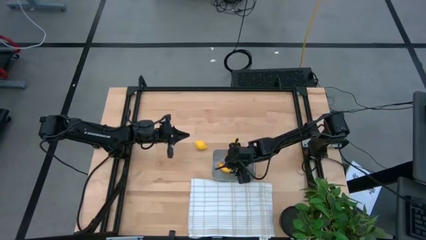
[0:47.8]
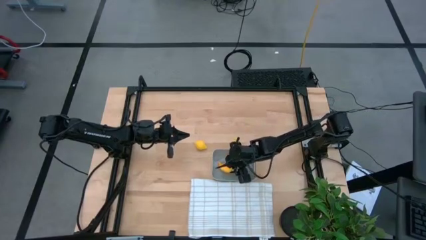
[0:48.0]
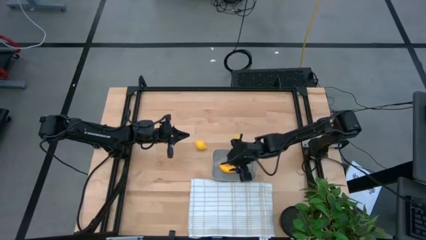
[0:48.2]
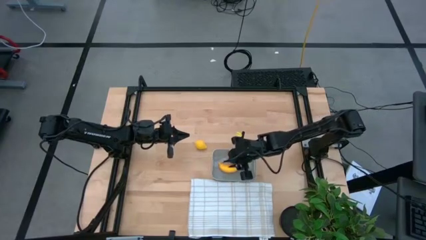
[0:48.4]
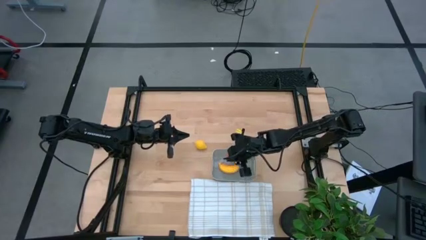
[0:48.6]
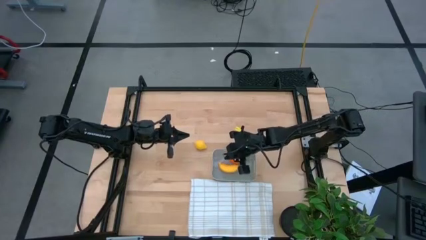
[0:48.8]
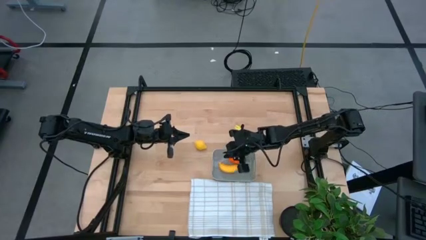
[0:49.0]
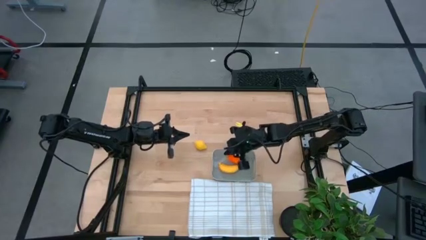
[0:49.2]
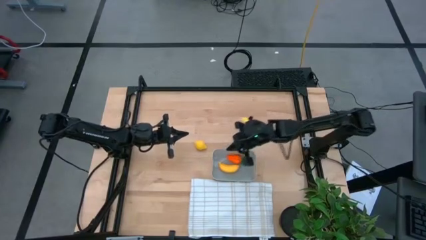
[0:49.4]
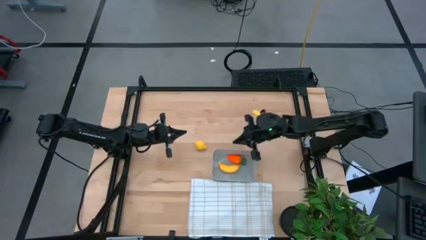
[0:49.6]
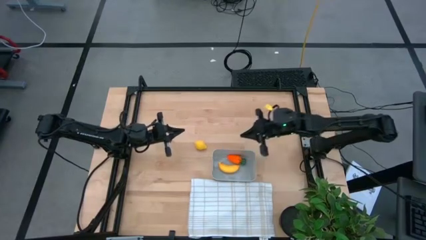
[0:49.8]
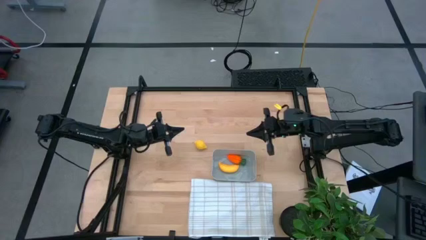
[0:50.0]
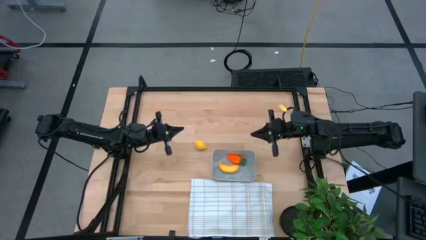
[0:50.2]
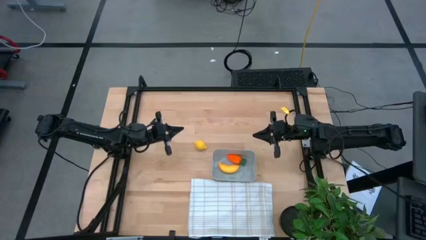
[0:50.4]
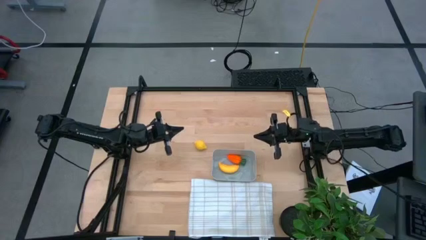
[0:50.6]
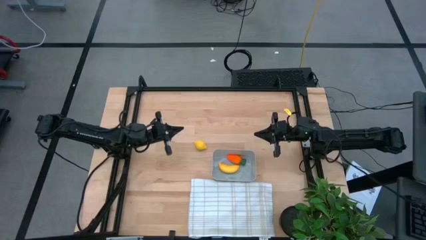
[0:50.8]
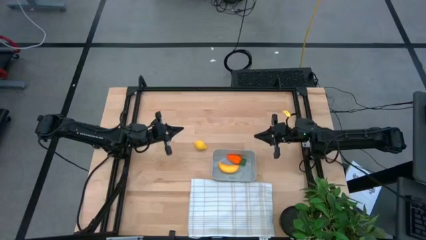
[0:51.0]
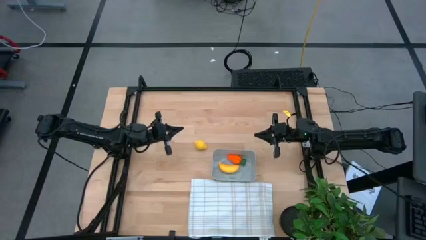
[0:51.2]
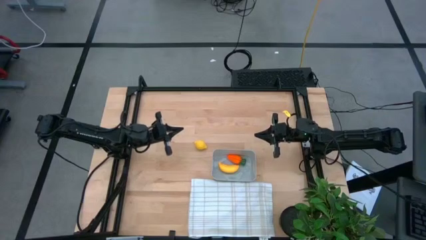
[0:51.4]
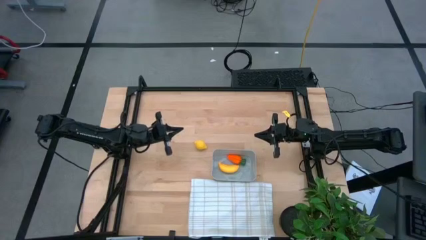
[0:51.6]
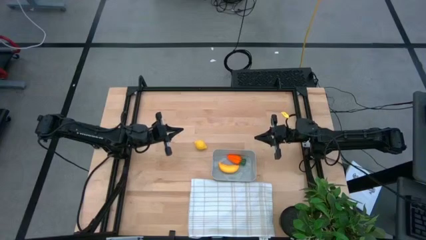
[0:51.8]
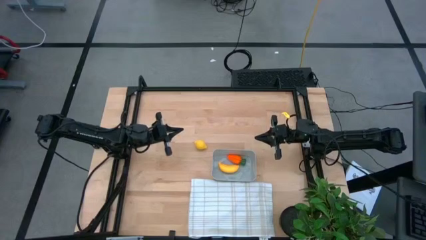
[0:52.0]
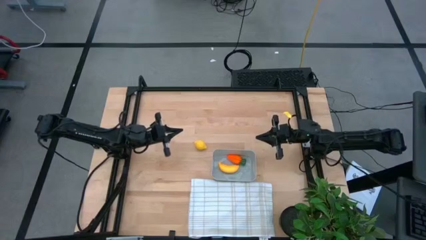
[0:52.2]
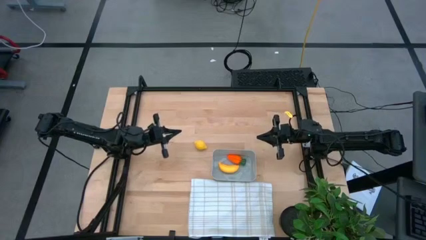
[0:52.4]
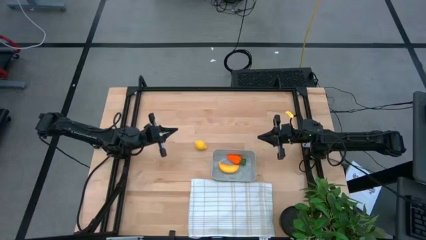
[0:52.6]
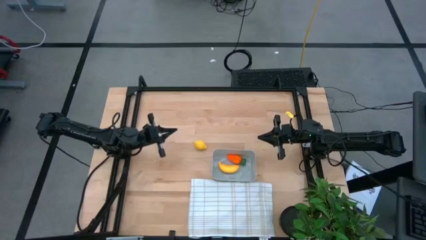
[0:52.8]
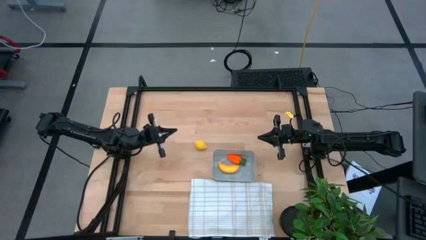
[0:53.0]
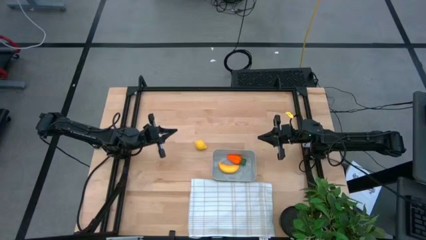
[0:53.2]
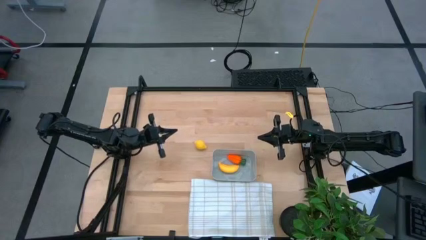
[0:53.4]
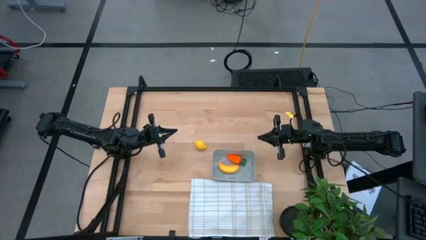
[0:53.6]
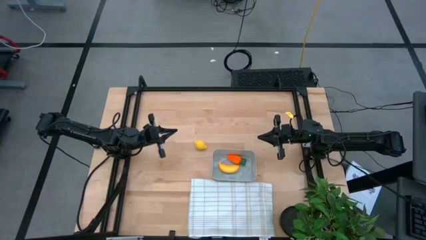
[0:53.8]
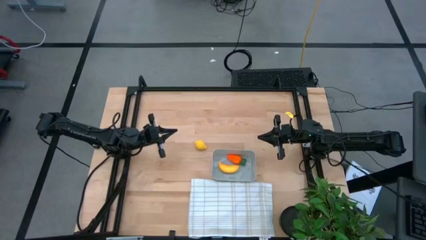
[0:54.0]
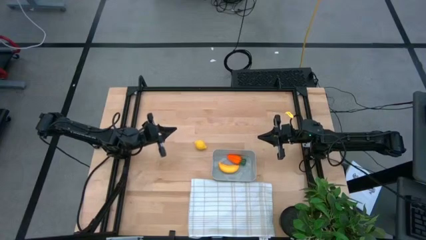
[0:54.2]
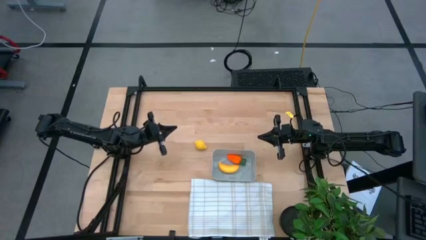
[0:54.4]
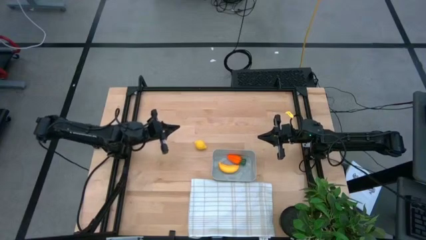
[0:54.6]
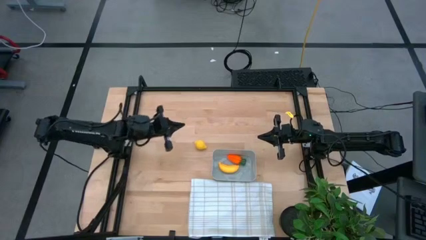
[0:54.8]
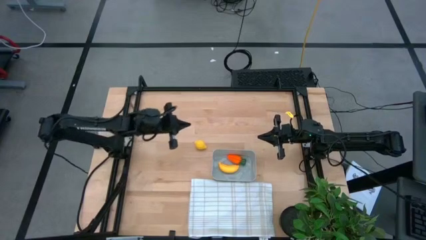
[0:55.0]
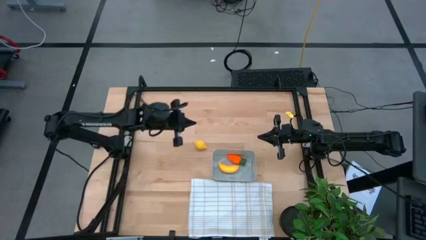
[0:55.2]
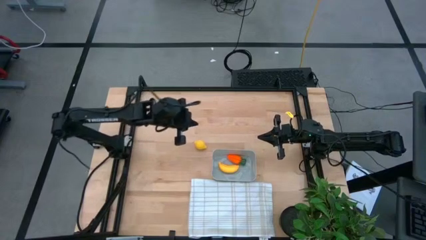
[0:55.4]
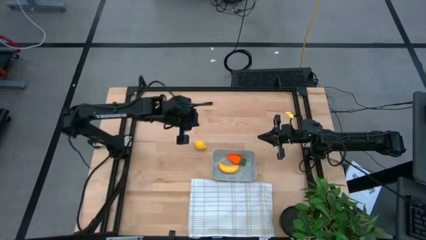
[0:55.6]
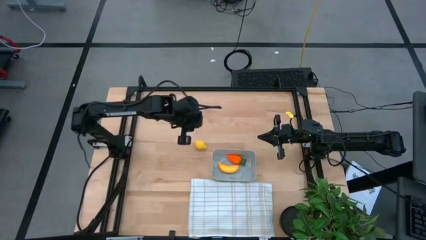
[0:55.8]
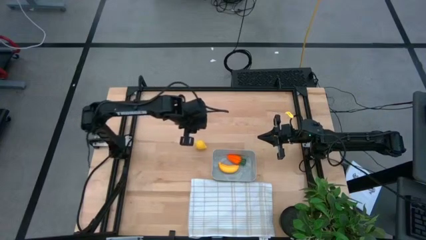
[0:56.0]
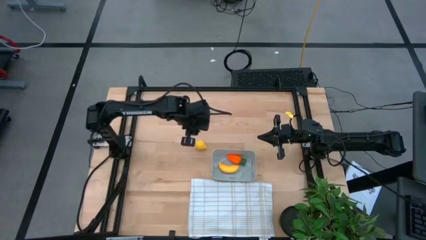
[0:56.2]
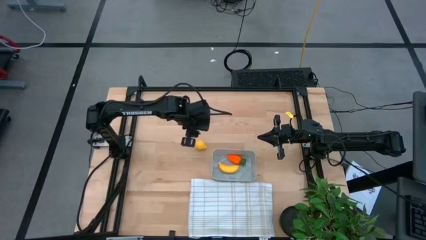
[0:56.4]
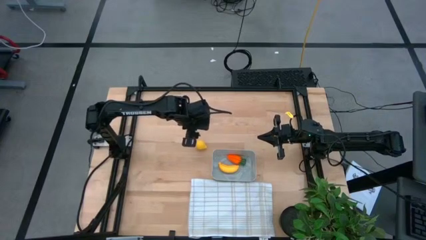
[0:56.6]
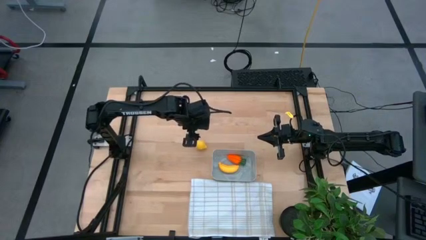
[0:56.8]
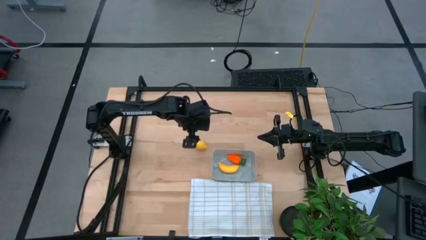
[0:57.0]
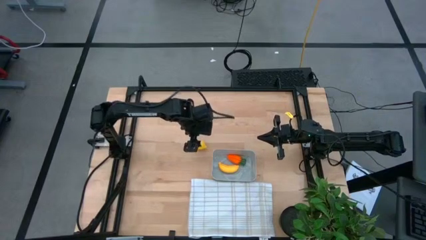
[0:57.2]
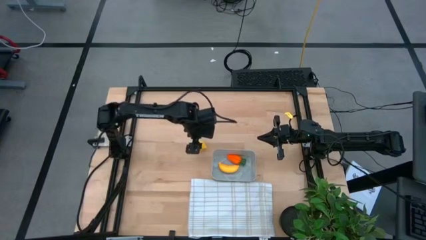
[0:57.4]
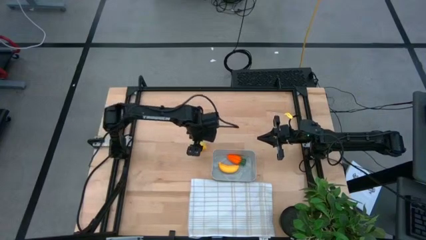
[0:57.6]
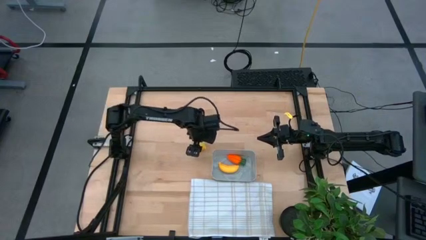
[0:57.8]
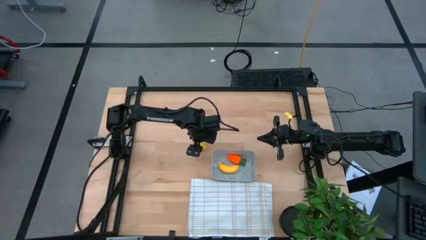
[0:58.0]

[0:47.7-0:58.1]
Task: Pick and placing Produce into tupperware
Put the lemon into the gray bin

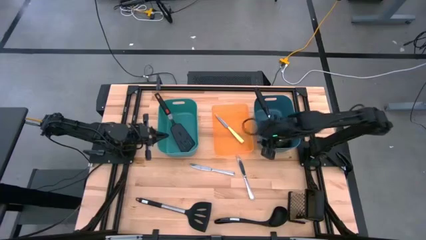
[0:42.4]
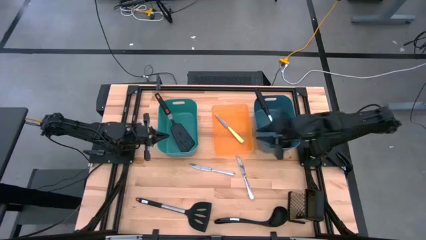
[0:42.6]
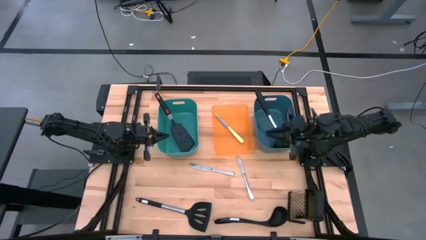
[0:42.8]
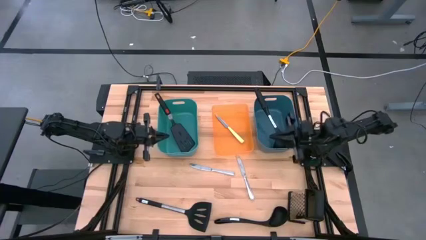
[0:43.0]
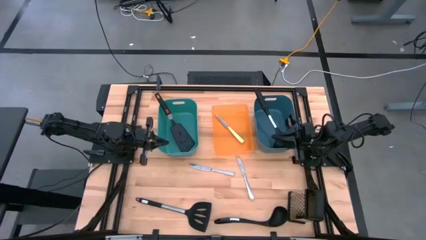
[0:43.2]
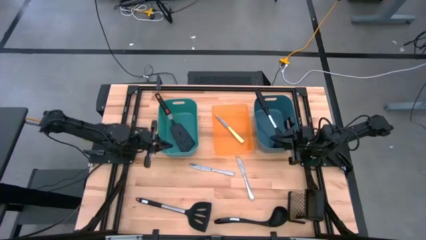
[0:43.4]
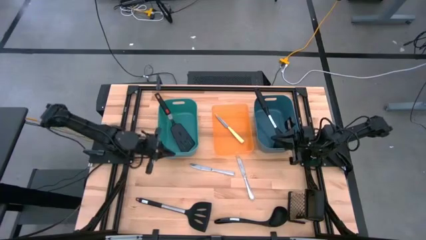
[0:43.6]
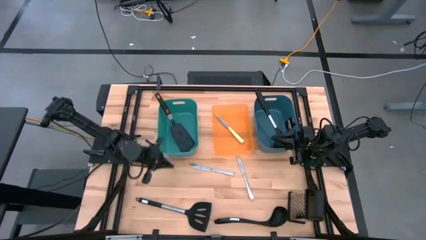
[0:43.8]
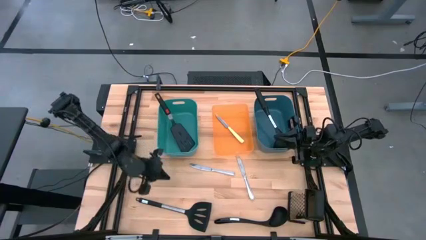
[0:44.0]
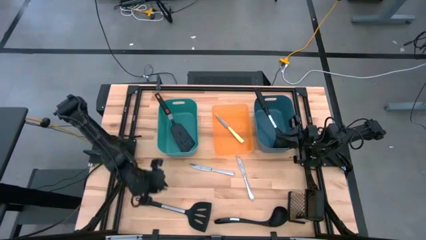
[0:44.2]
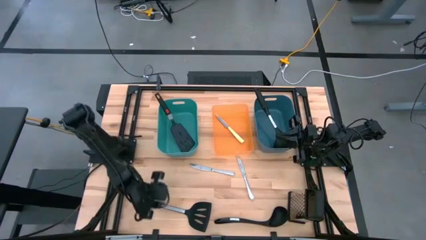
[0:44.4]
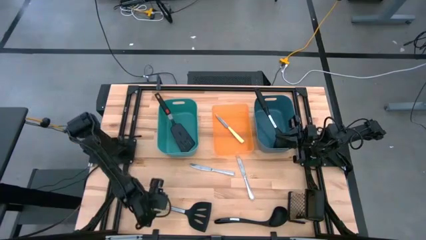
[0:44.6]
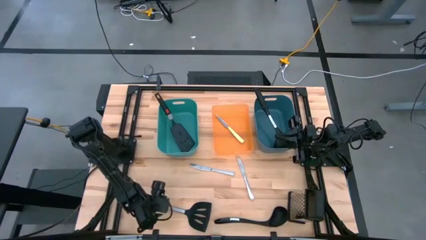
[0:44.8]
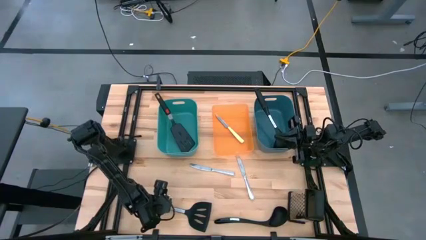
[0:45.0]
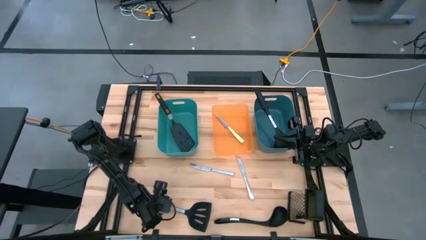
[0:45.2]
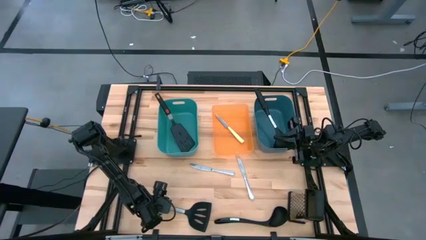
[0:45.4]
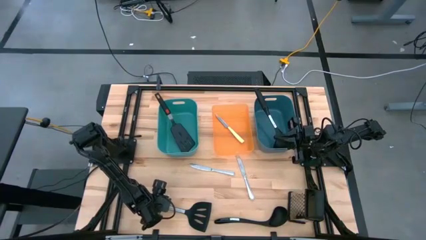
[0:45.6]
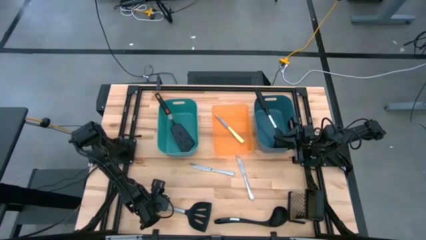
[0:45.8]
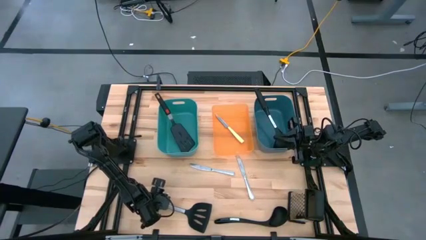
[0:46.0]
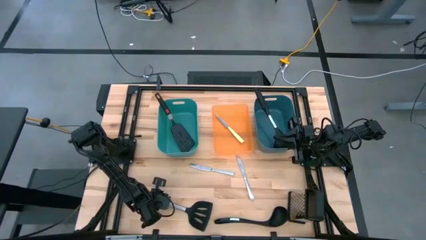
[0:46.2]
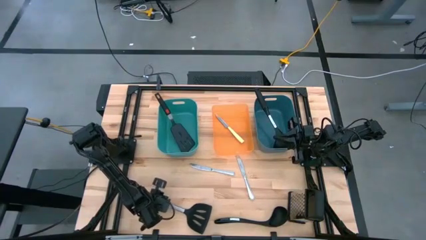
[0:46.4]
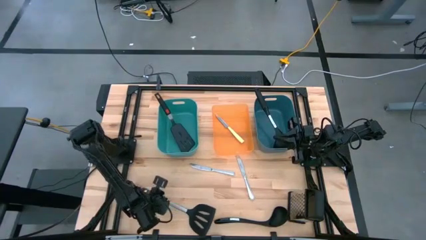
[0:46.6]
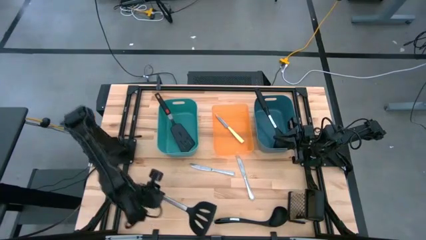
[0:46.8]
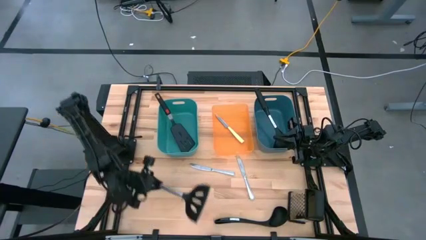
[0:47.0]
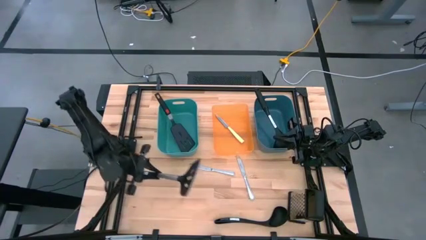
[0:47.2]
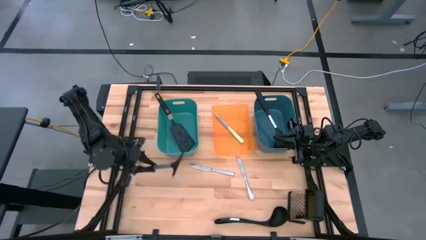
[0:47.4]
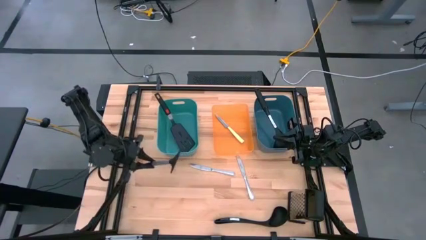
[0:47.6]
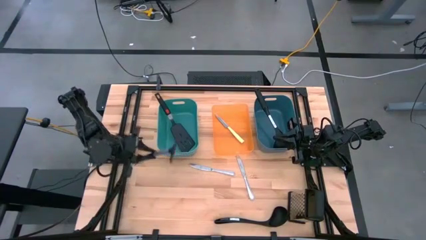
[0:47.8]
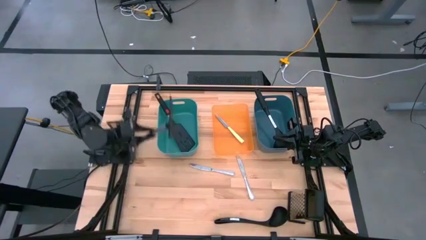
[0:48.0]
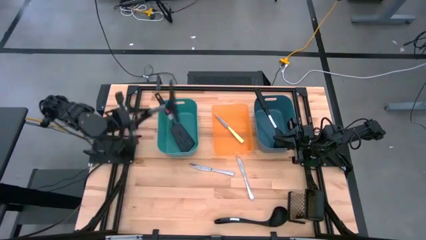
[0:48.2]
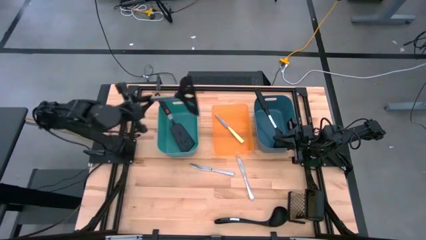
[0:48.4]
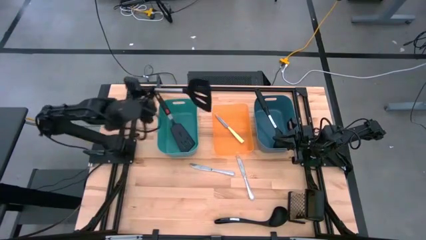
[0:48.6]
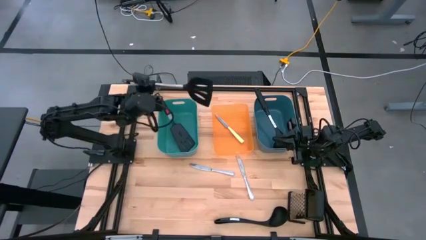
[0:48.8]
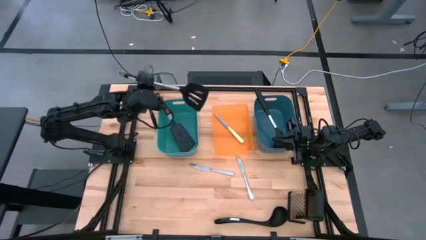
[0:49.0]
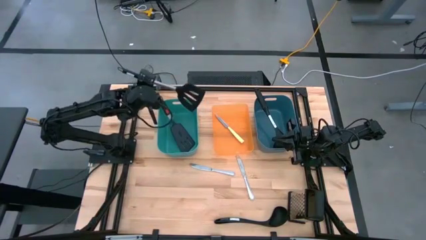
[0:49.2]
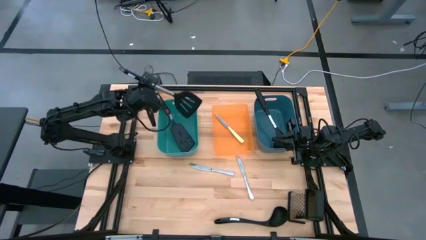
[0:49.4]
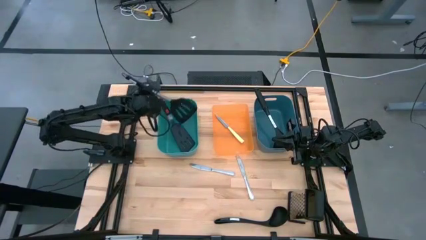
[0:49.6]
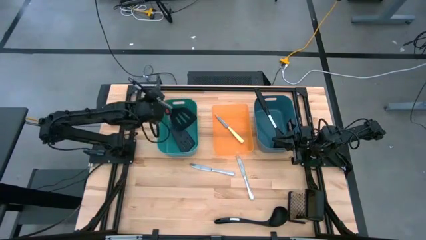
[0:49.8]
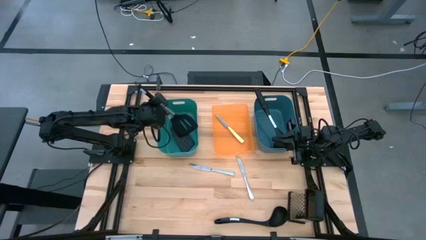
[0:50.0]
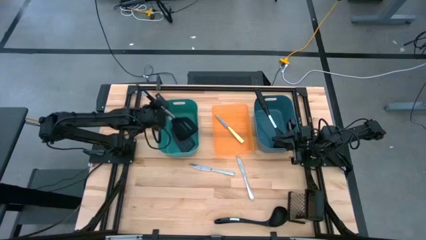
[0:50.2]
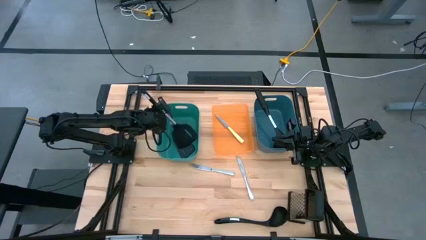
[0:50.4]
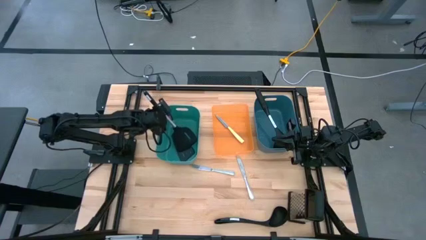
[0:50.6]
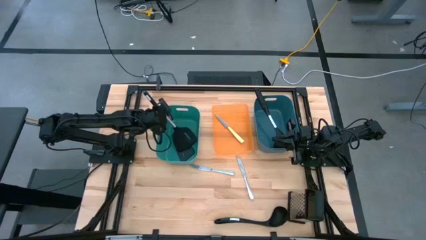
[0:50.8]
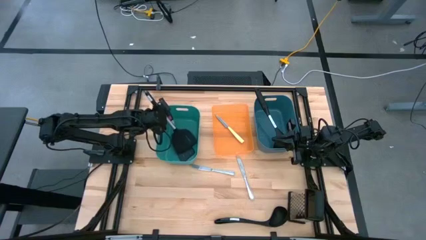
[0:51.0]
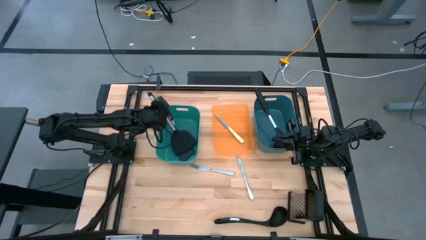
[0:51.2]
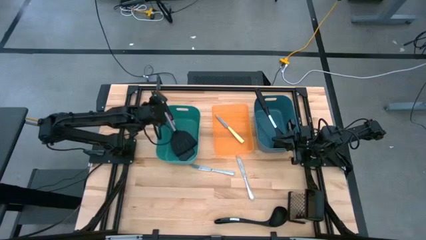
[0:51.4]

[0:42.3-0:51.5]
Task: Pick & Place Kitchen Items
Put the black spatula into the green bin
